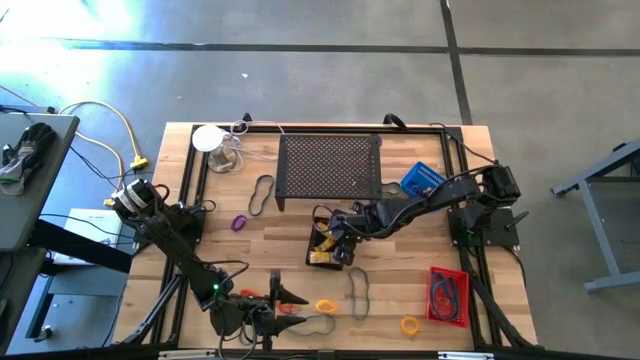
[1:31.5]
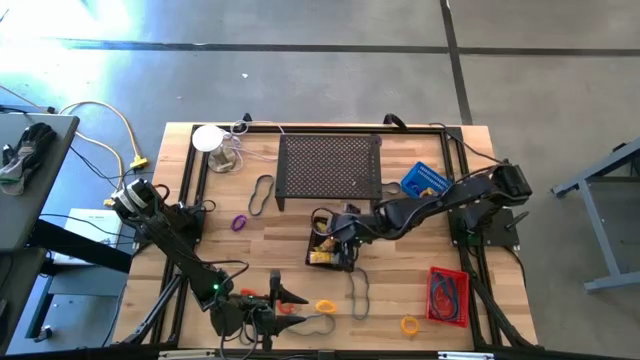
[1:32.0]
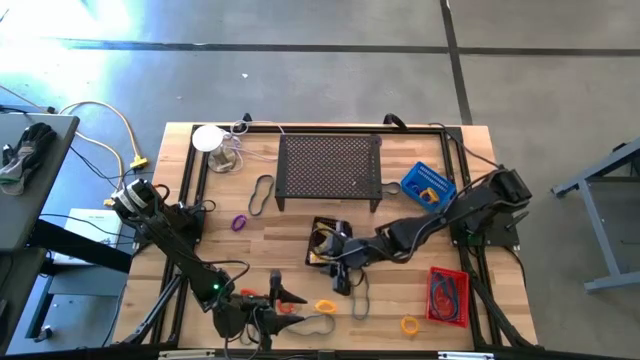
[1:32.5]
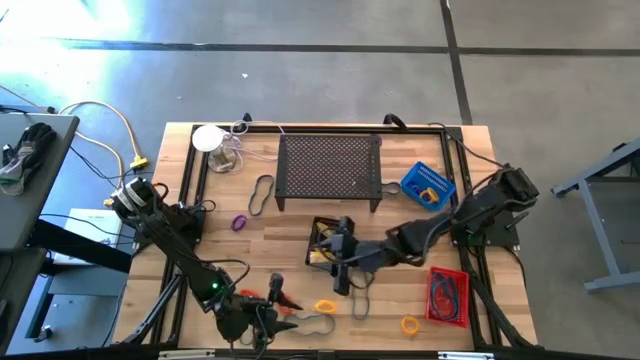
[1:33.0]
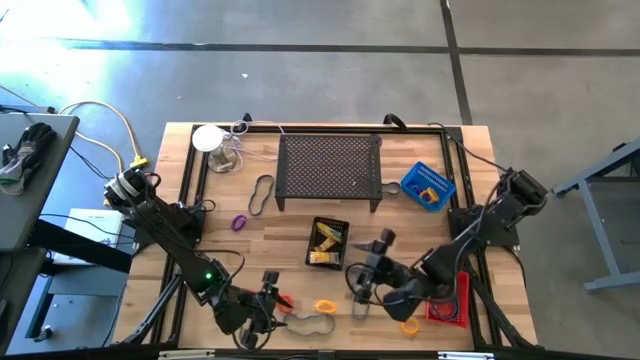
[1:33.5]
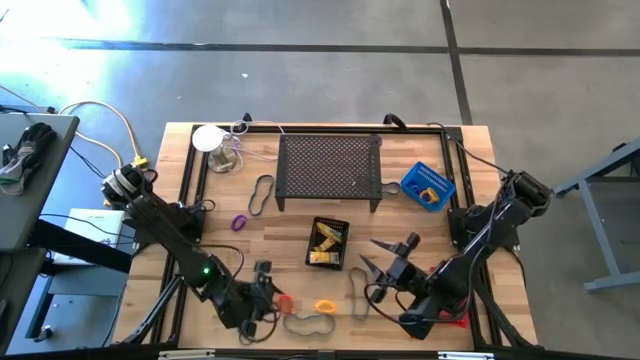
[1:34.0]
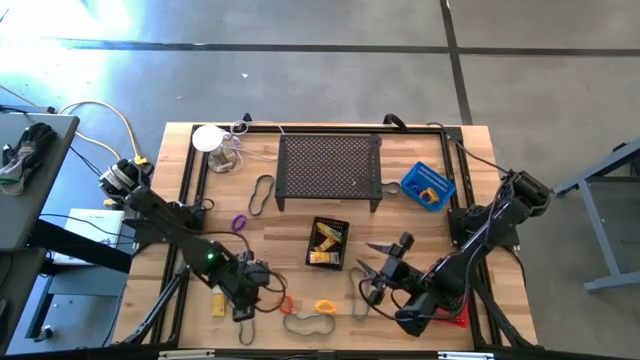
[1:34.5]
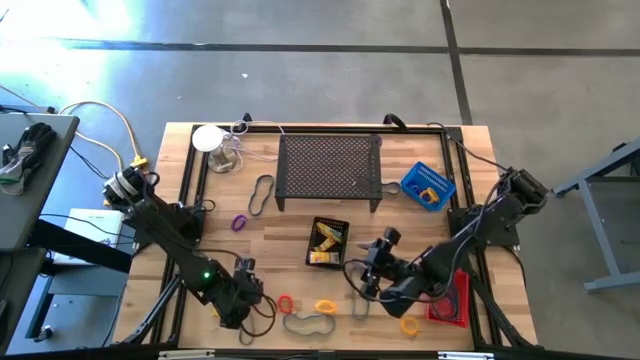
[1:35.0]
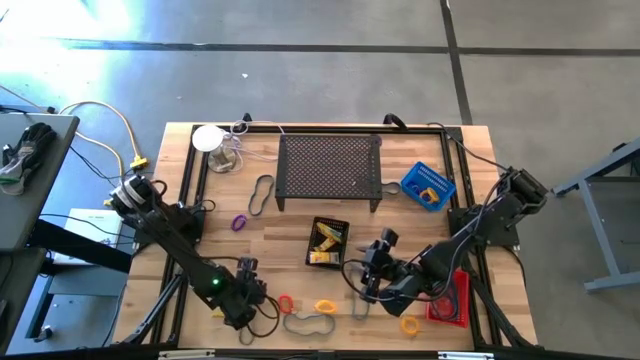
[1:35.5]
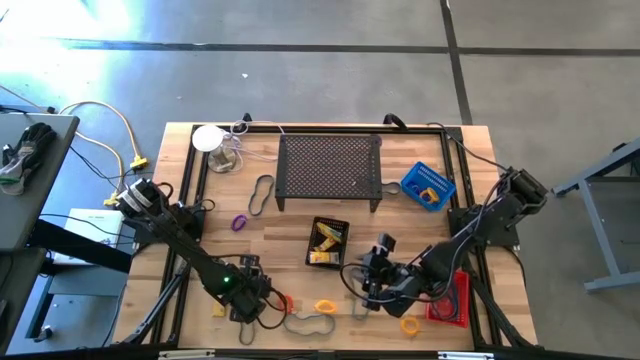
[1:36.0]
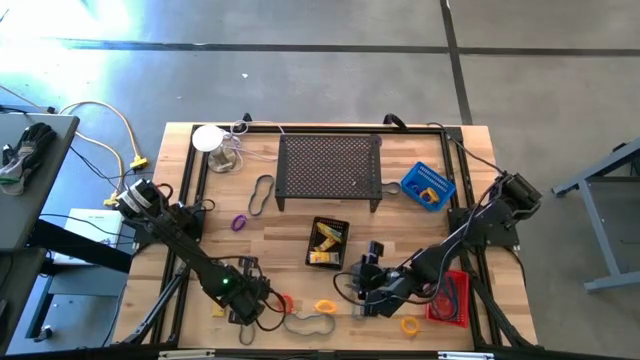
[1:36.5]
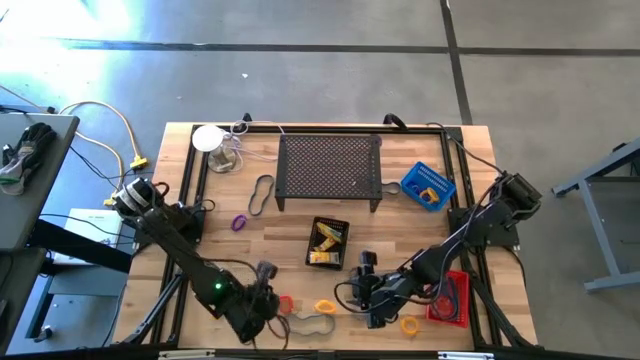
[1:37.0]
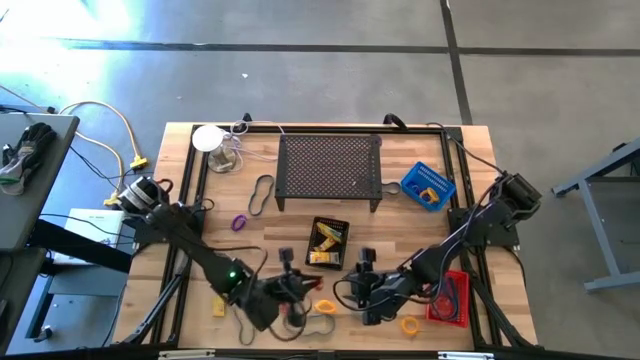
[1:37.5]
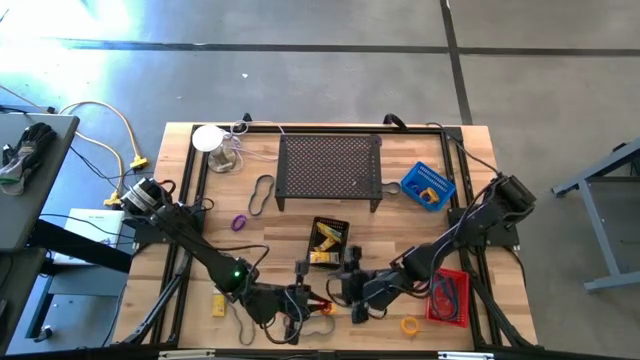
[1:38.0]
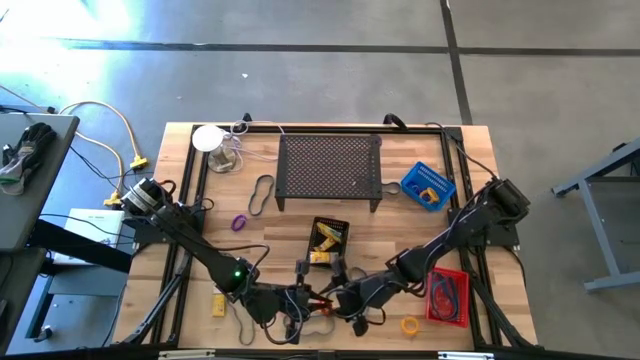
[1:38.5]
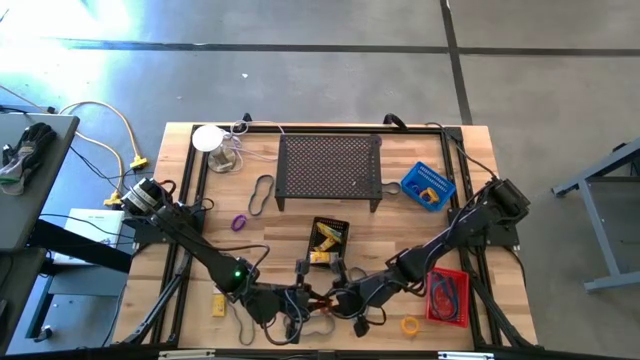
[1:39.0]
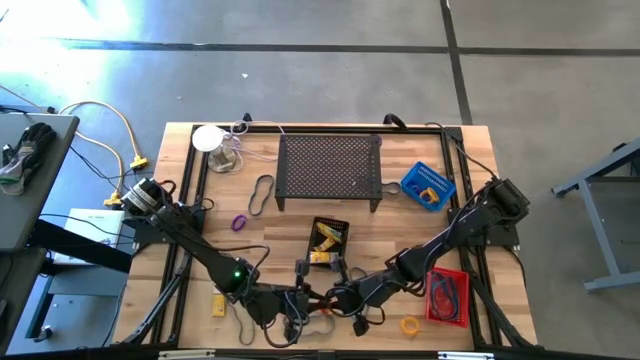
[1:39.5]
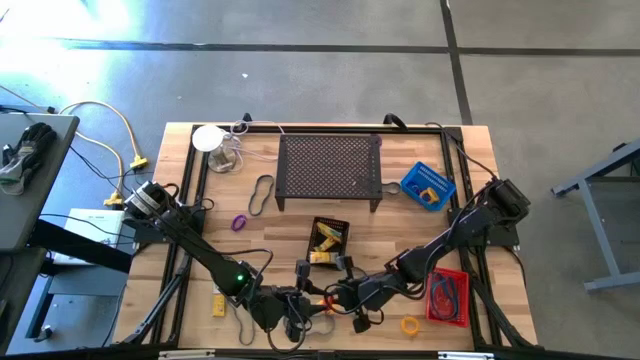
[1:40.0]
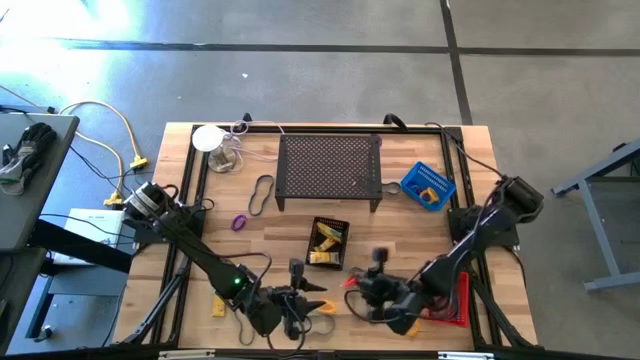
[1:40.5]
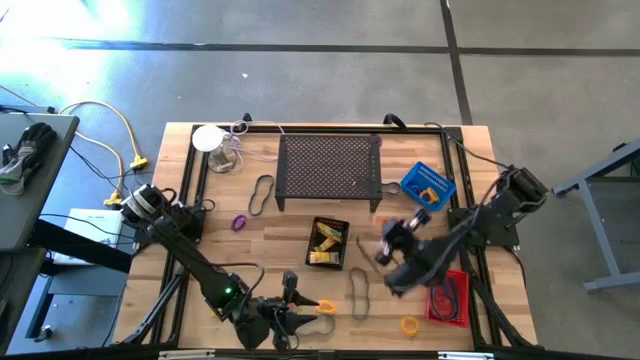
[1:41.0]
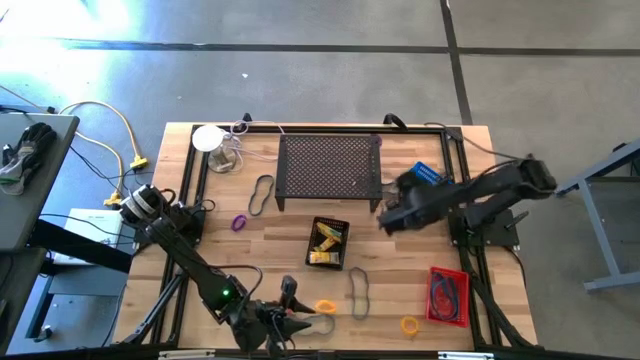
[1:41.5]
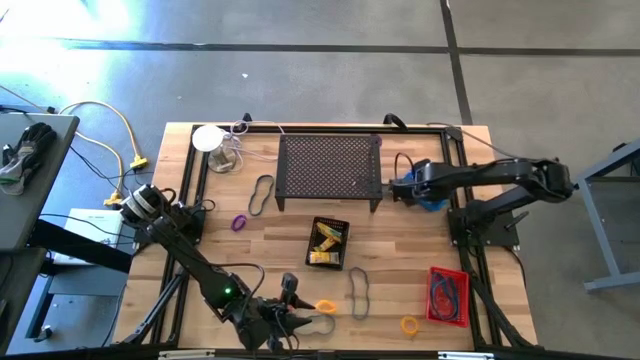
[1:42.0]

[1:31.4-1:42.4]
Task: Pick & Place Office Desk Supplies
Put the orange spring keychain into the blue bin

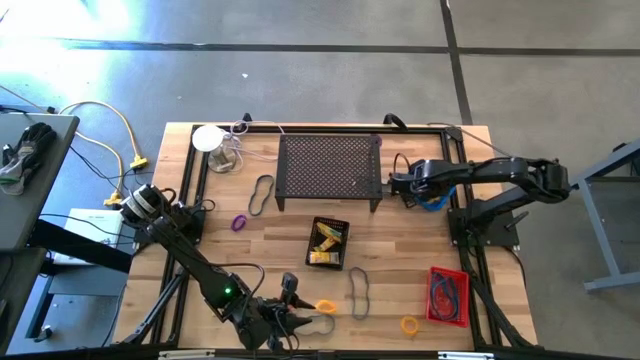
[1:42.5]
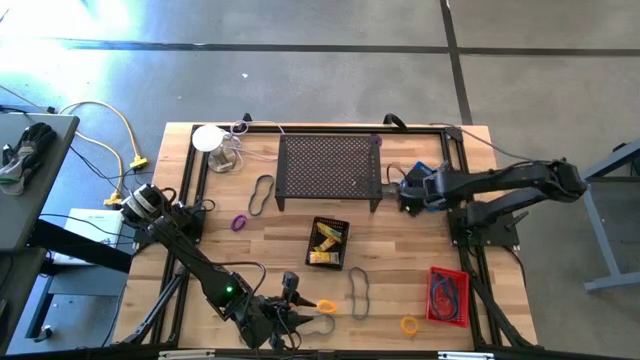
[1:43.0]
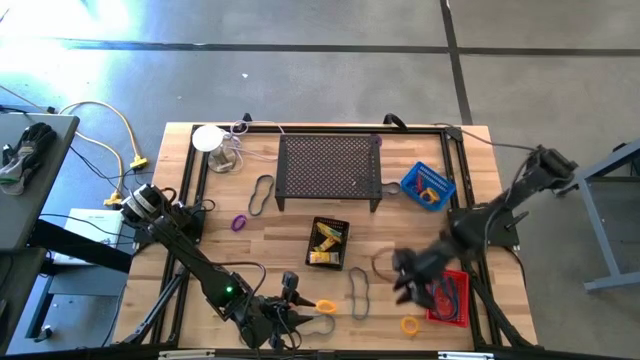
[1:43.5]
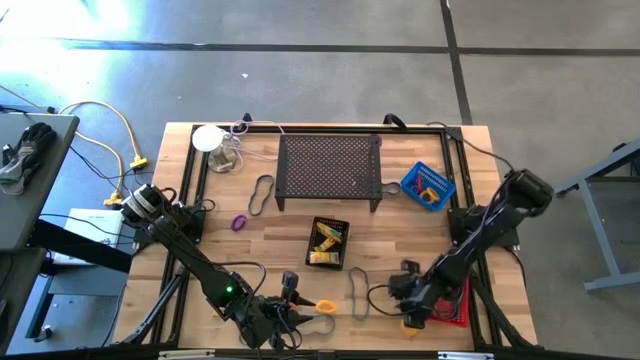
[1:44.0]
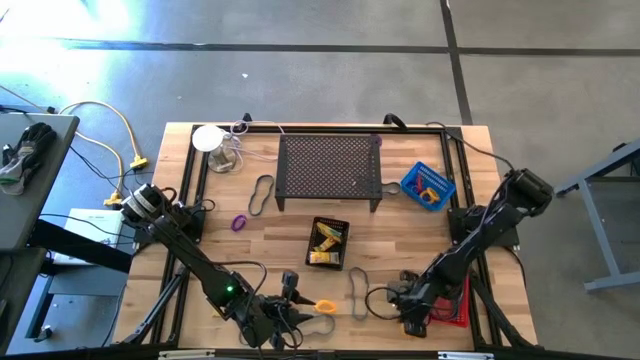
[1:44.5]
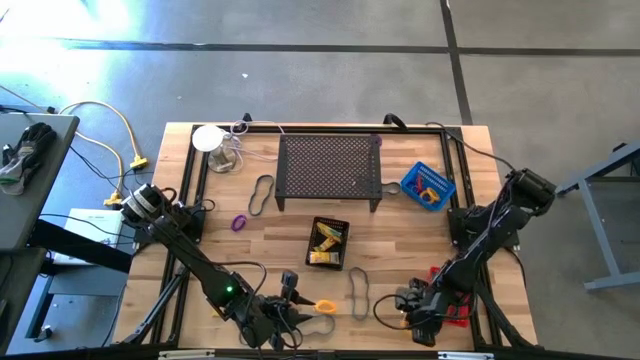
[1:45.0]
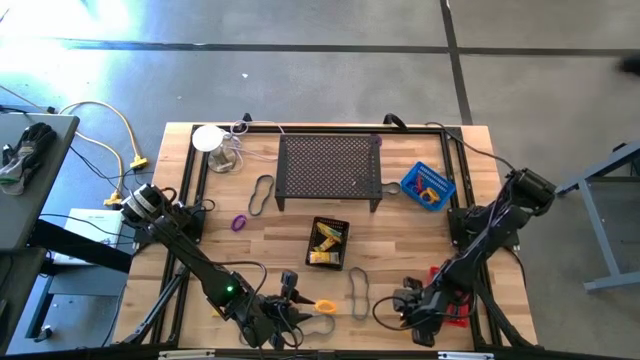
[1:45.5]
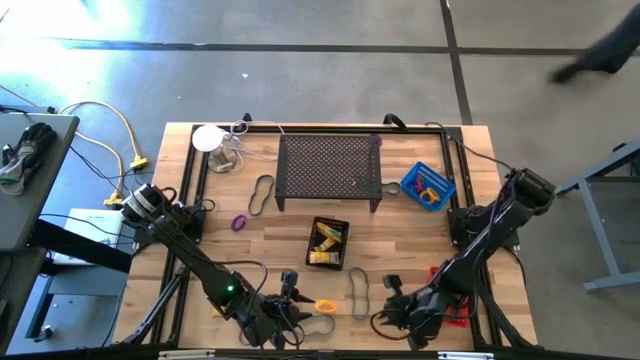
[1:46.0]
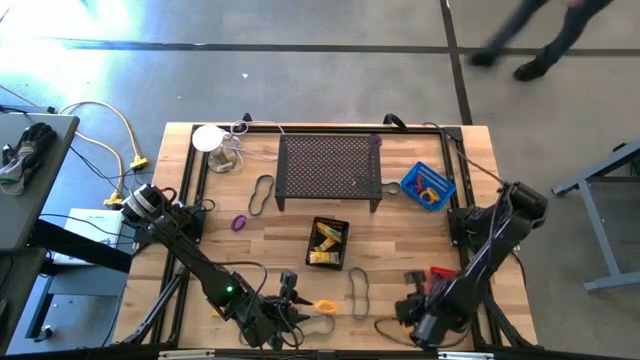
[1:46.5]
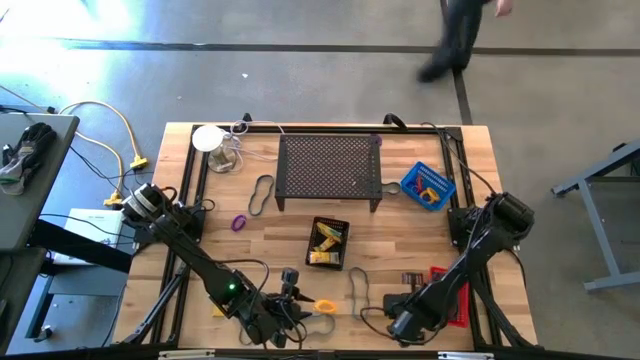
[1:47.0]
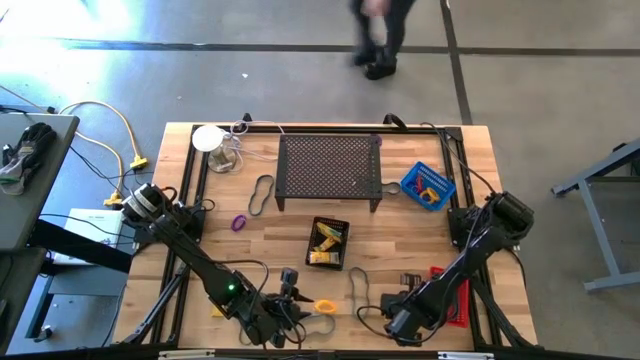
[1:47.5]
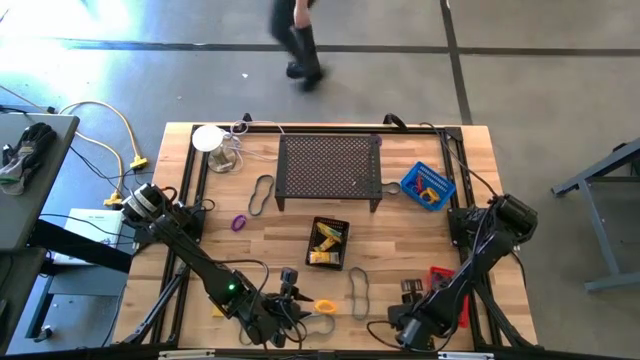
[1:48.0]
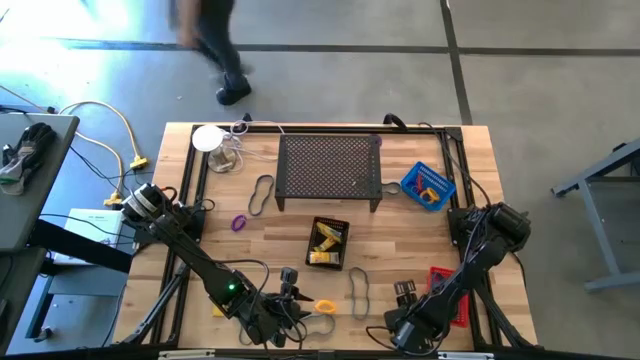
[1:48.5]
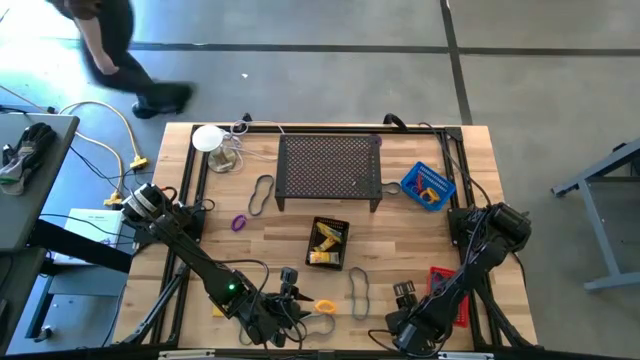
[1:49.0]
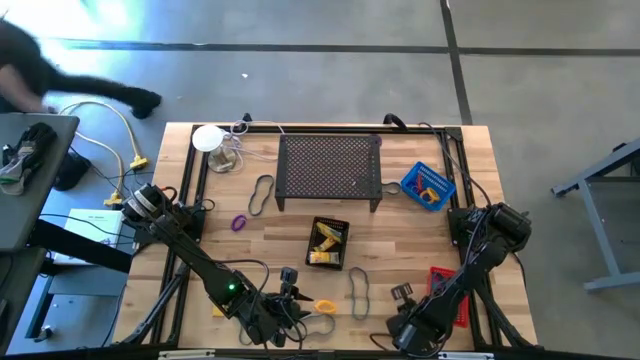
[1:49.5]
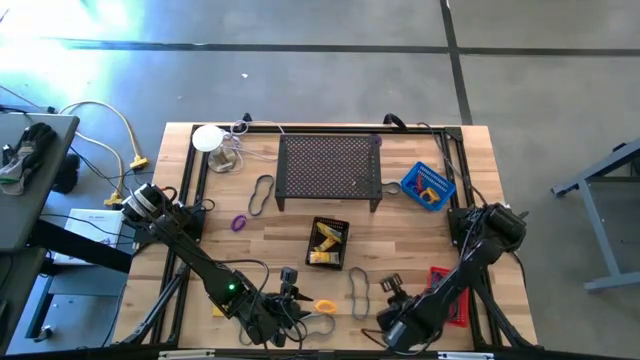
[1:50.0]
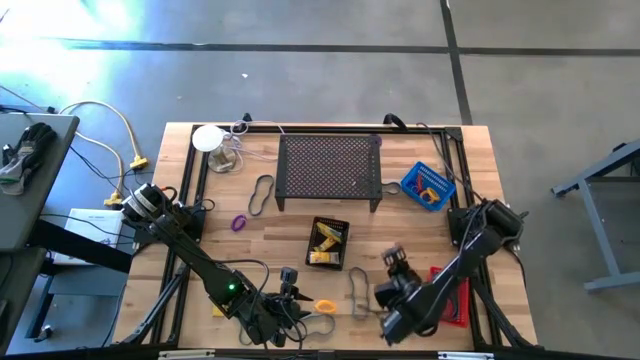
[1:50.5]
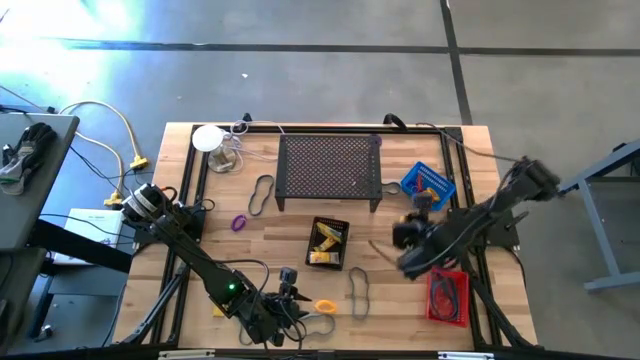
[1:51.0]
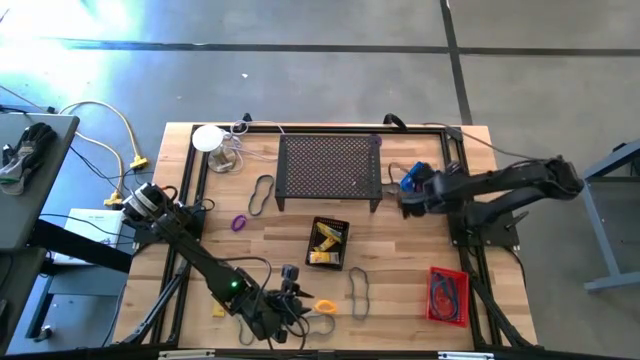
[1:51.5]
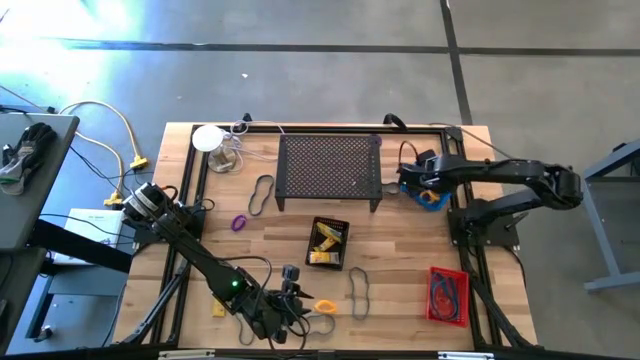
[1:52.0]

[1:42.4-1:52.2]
Put the yellow spring keychain into the blue bin
